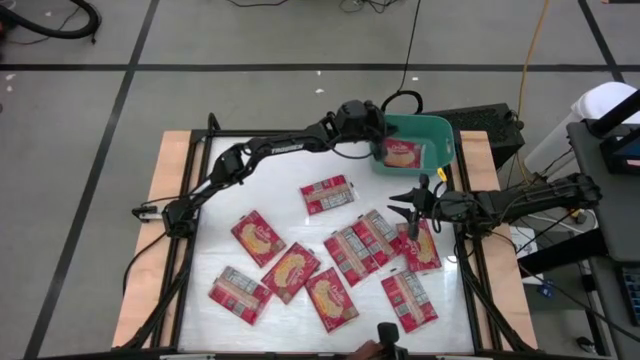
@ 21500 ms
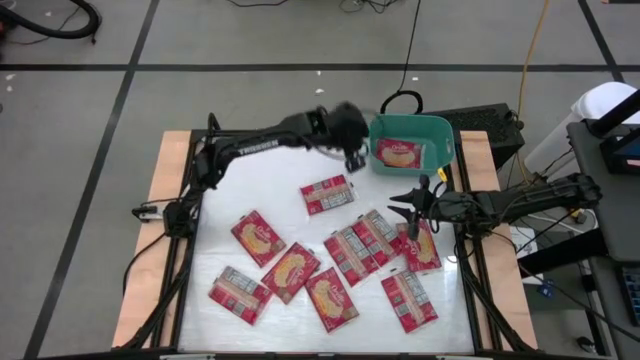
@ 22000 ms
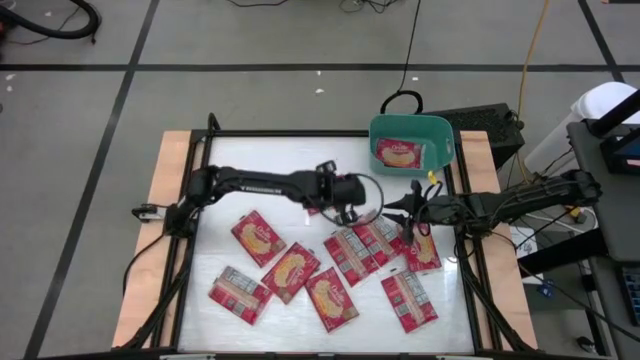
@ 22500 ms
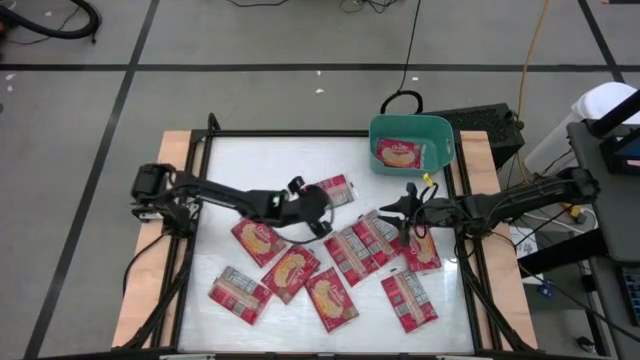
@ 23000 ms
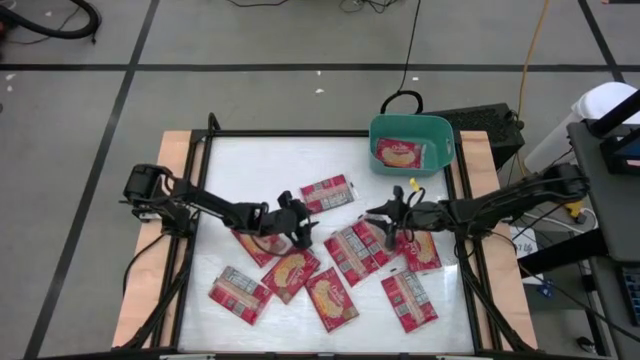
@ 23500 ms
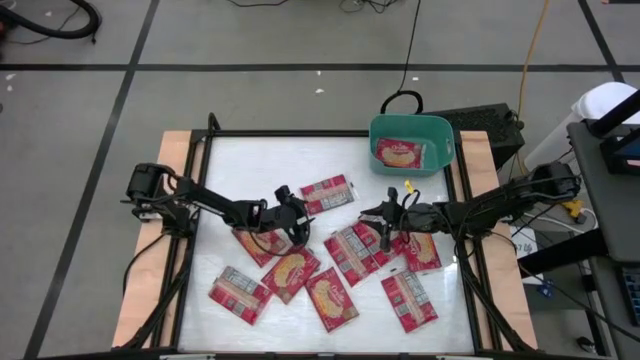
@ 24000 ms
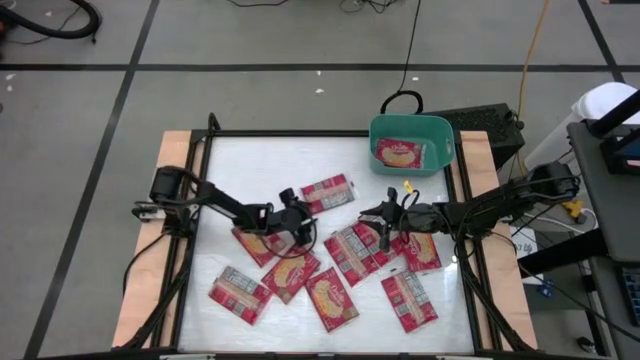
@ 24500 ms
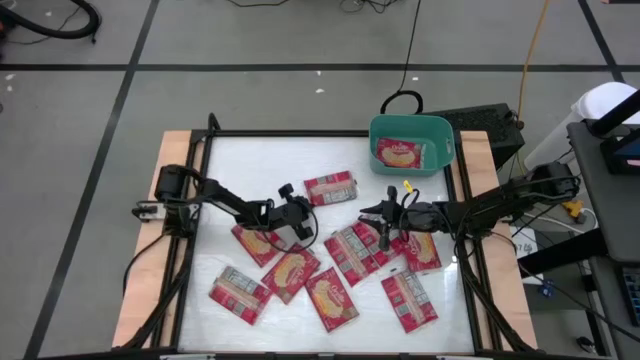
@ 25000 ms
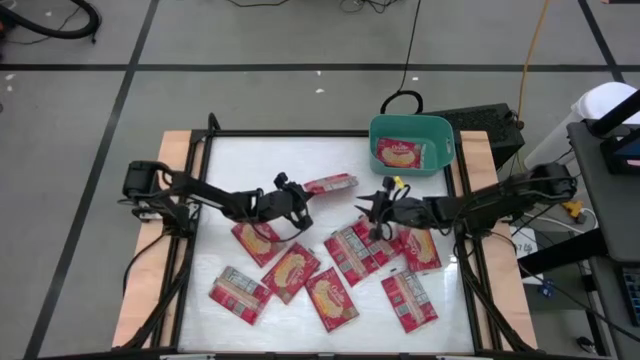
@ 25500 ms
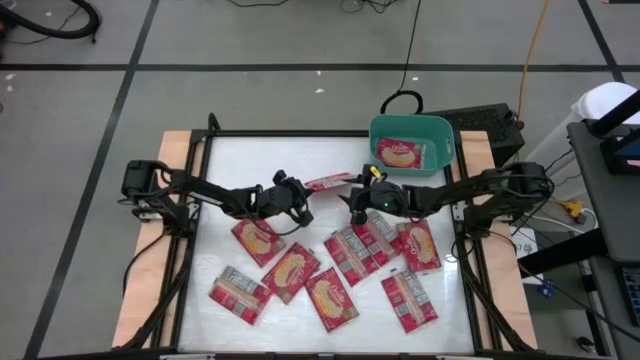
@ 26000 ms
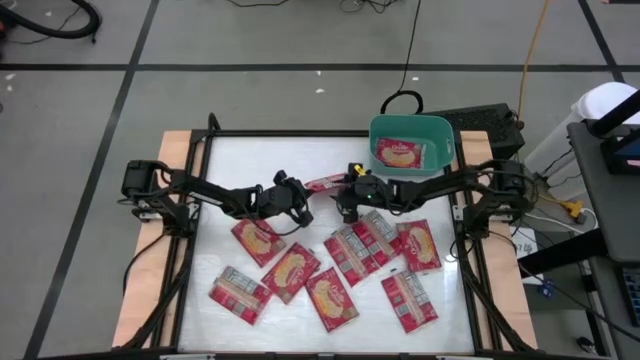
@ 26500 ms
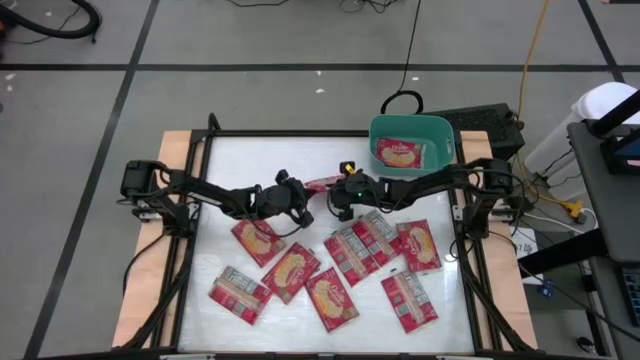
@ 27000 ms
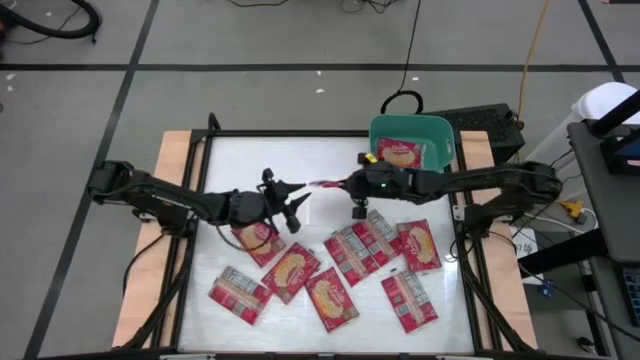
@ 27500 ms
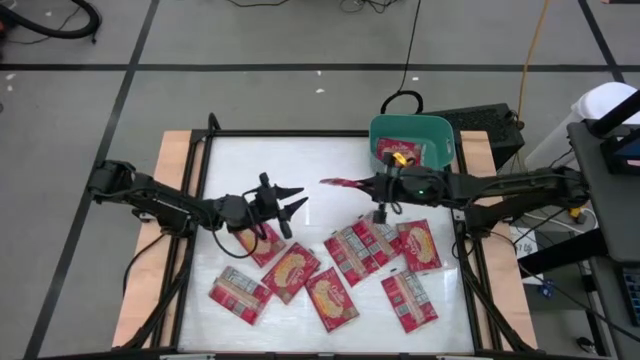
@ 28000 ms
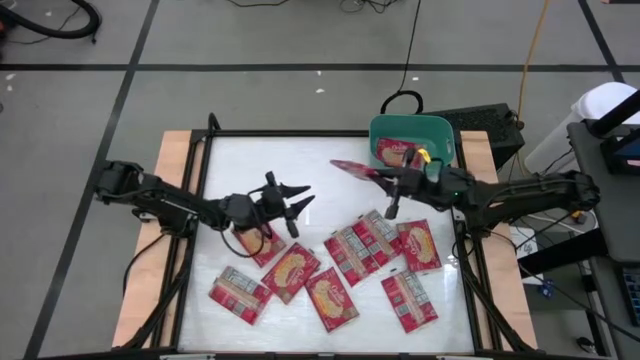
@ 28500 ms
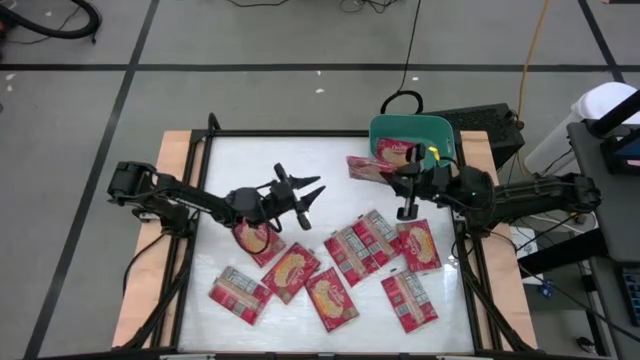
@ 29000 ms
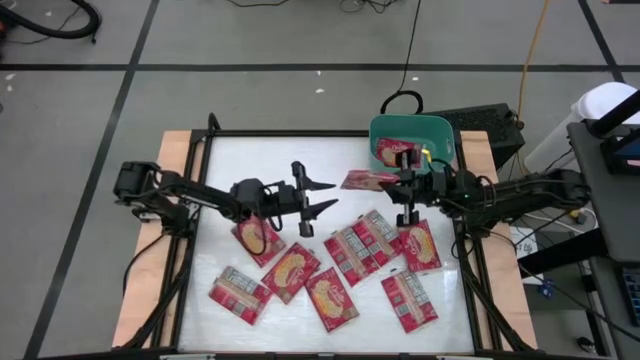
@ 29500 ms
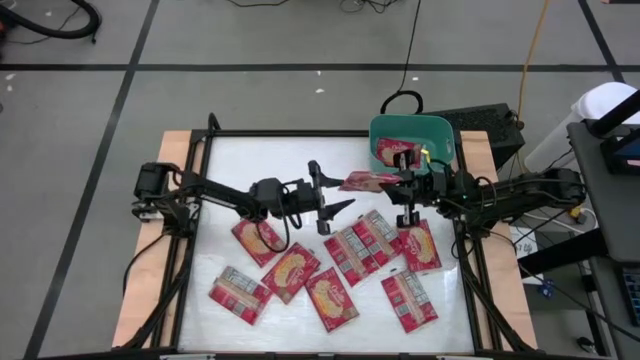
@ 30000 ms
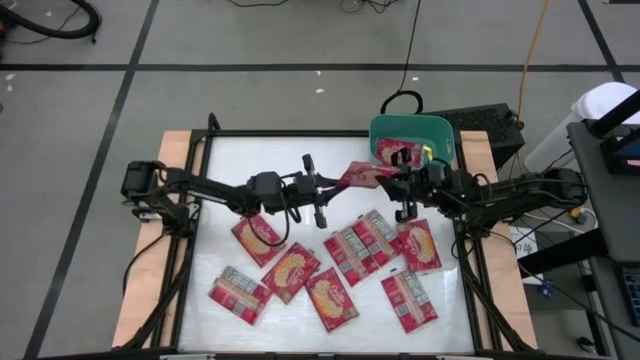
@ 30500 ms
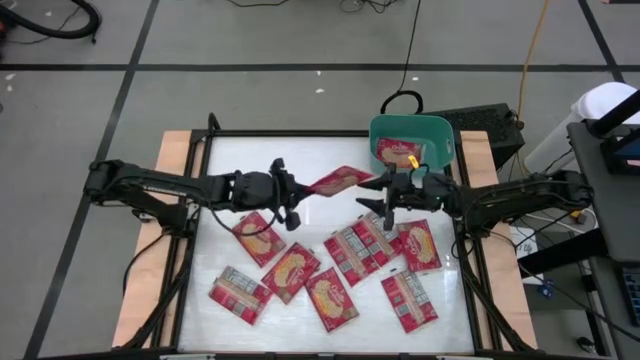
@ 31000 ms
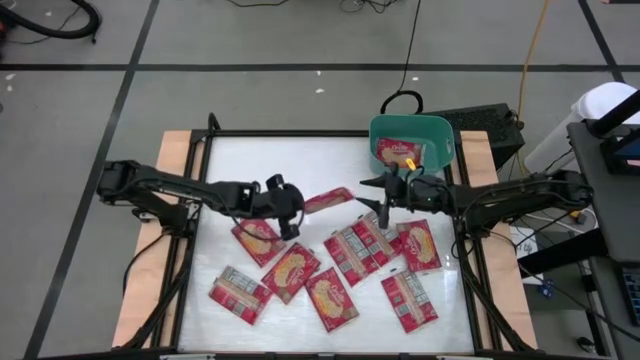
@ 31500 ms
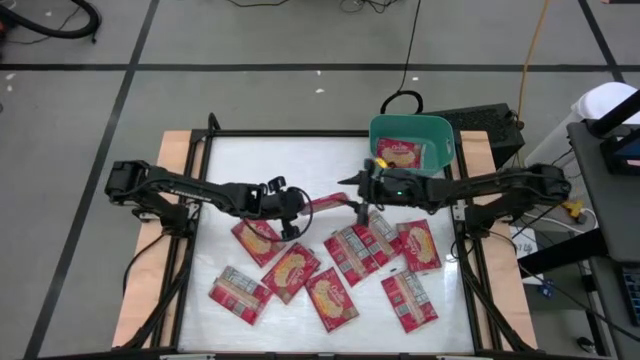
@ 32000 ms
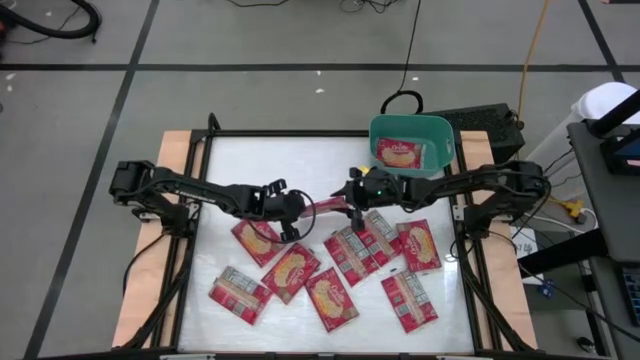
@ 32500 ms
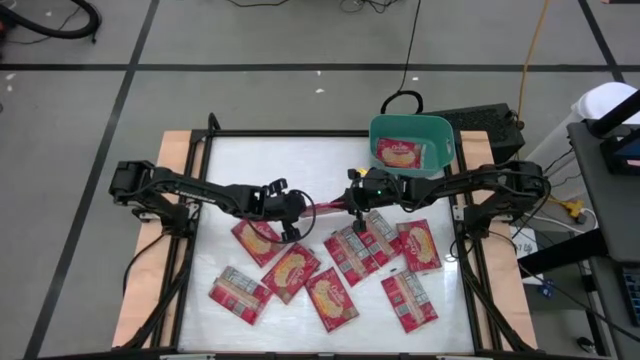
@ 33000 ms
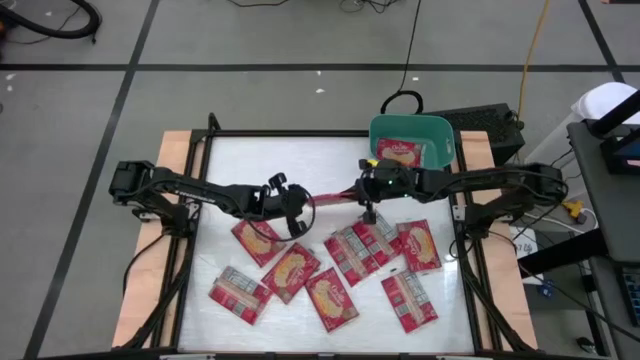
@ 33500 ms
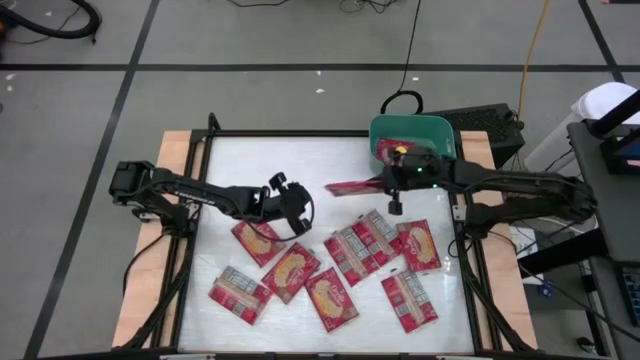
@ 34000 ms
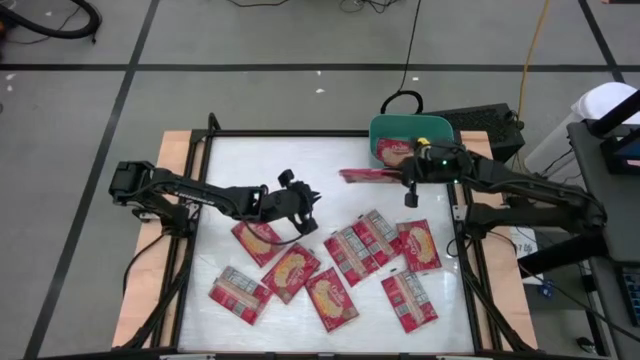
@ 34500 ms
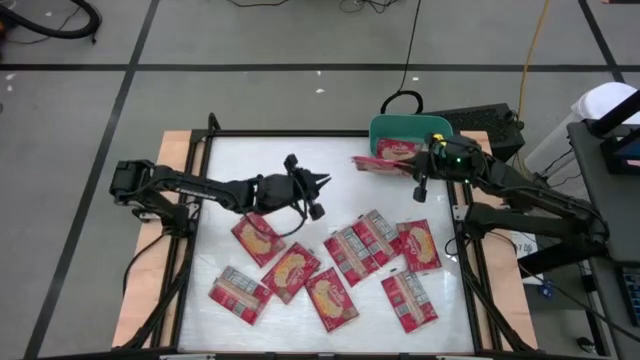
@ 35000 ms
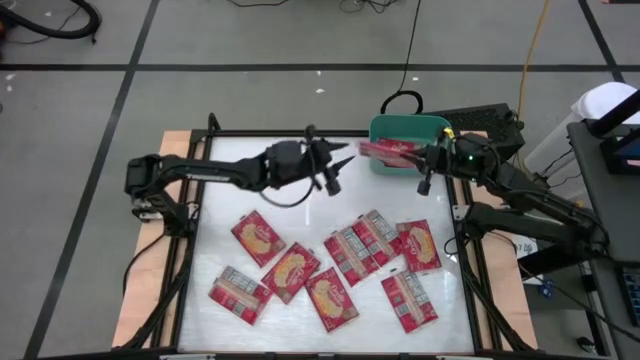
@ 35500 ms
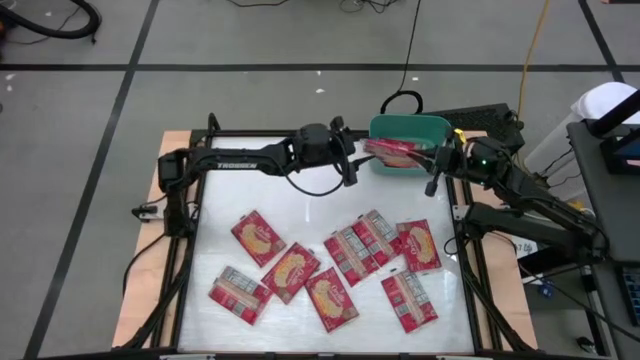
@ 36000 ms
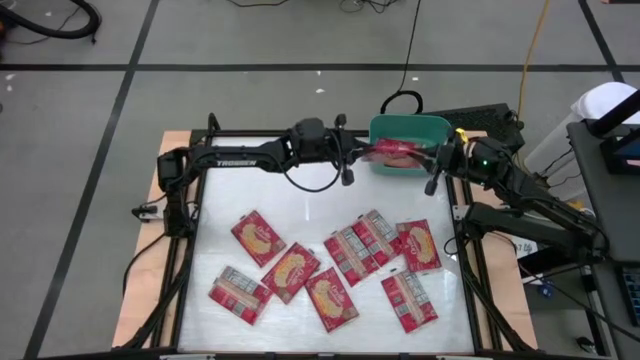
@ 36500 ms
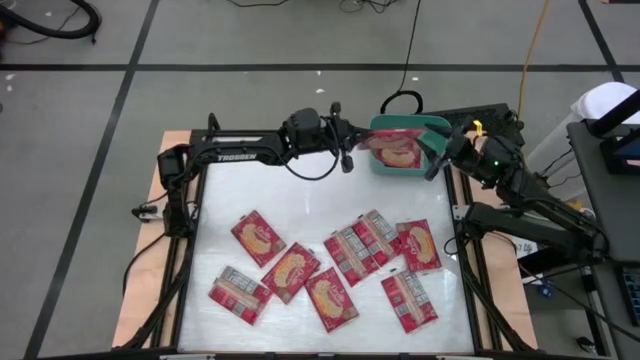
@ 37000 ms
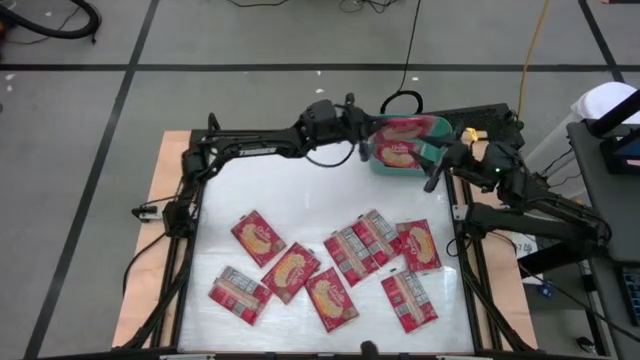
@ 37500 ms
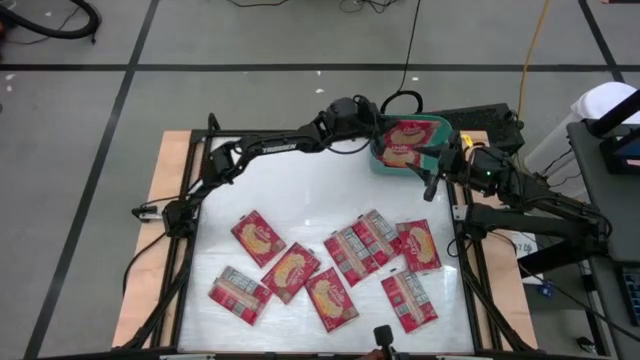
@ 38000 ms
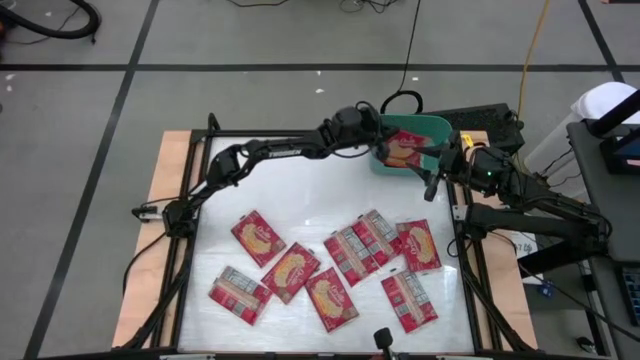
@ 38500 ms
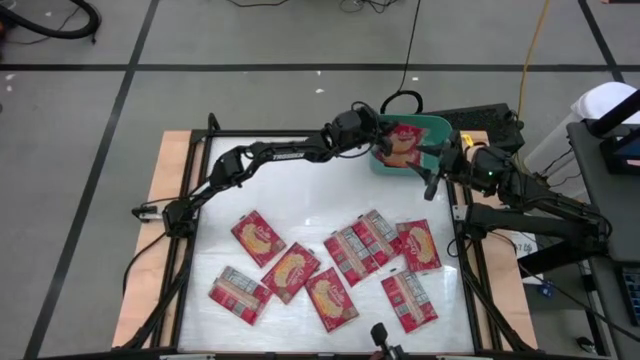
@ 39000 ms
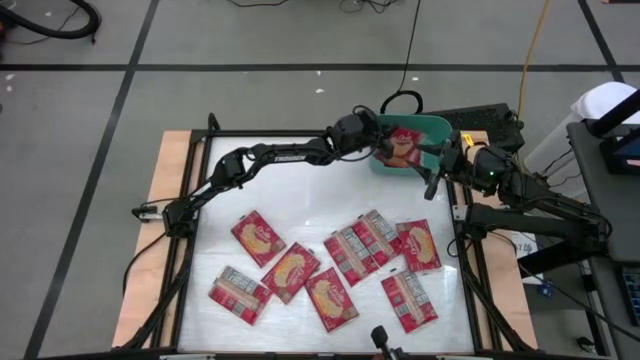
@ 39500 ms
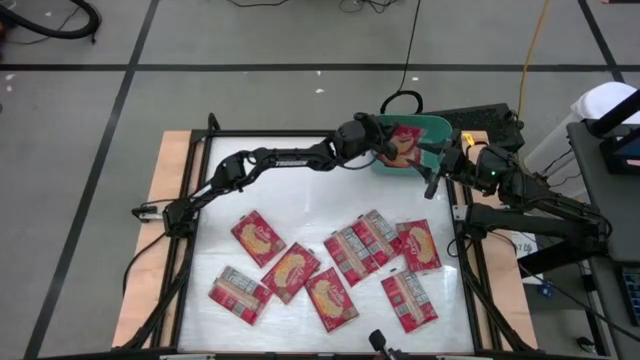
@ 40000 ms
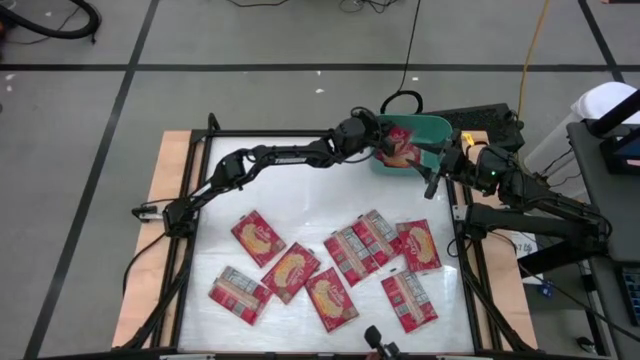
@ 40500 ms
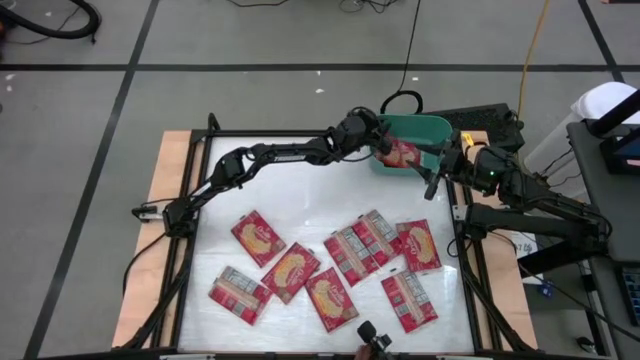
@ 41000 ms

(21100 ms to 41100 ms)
Task: Sort popcorn bags into baskets
Put the red popcorn bag into the green bin
